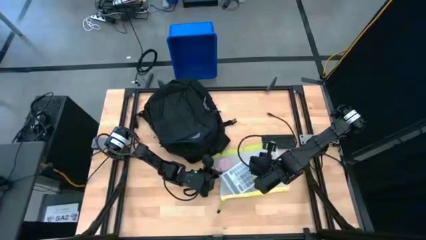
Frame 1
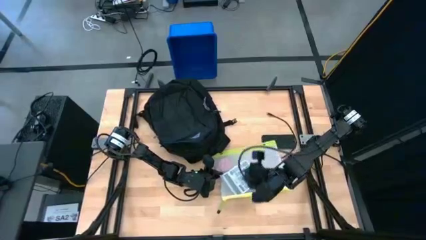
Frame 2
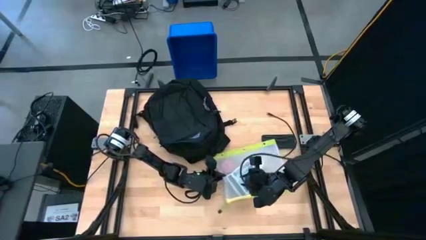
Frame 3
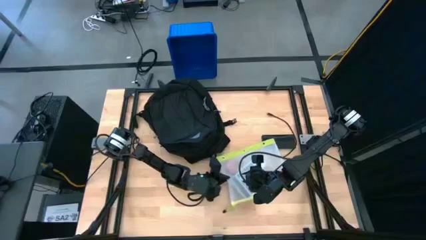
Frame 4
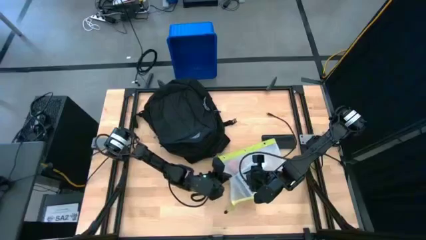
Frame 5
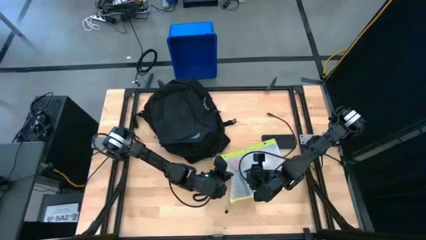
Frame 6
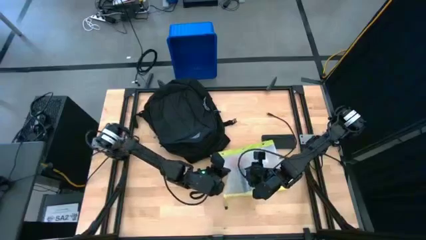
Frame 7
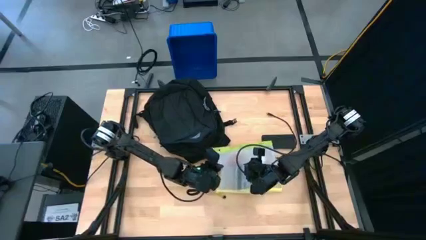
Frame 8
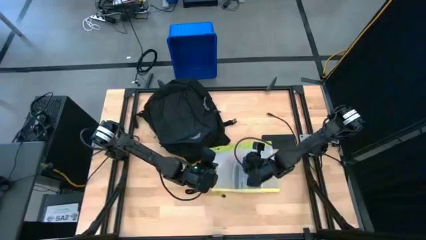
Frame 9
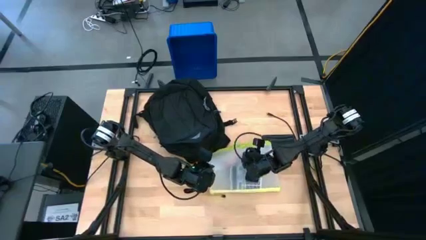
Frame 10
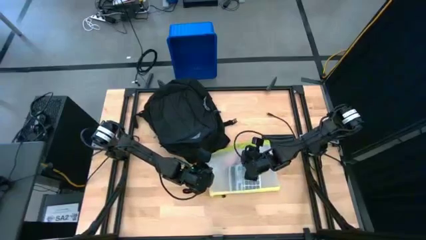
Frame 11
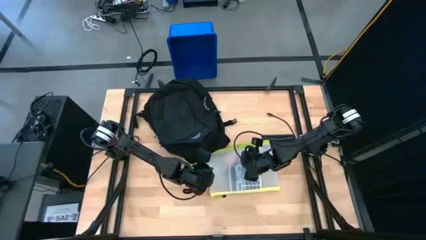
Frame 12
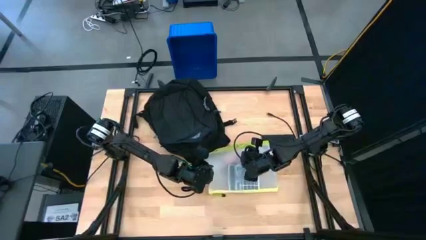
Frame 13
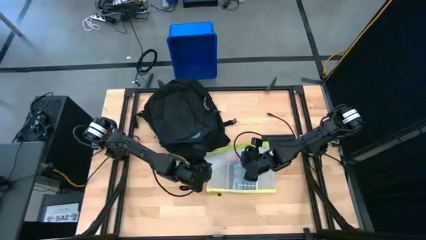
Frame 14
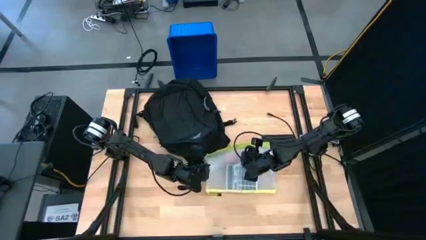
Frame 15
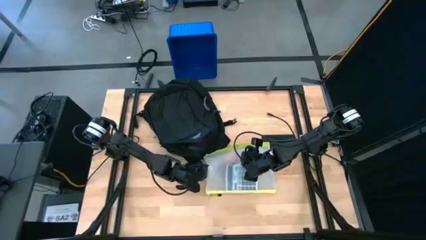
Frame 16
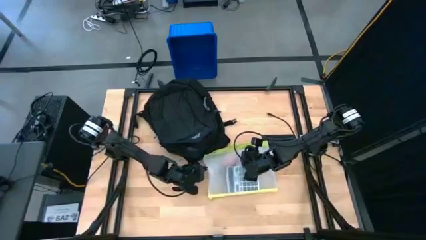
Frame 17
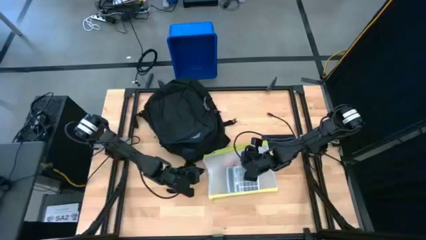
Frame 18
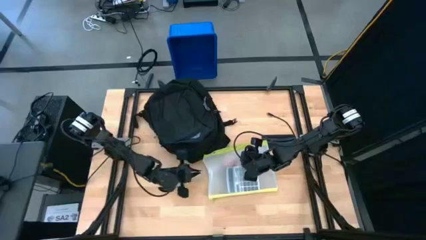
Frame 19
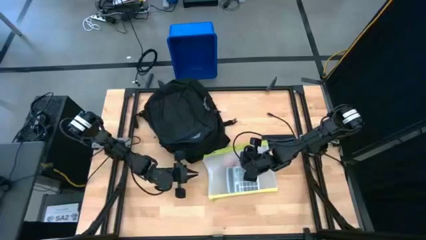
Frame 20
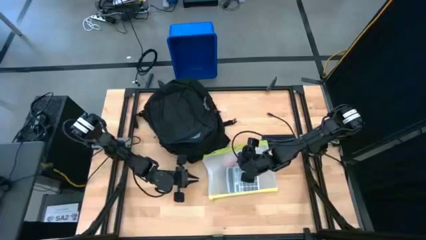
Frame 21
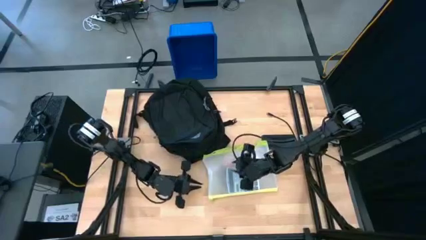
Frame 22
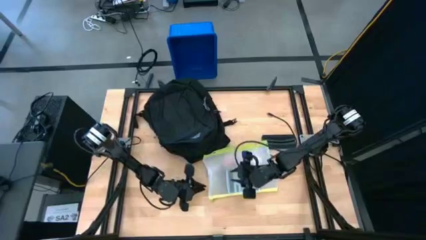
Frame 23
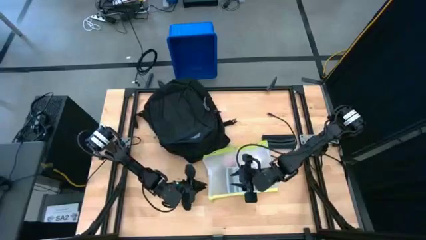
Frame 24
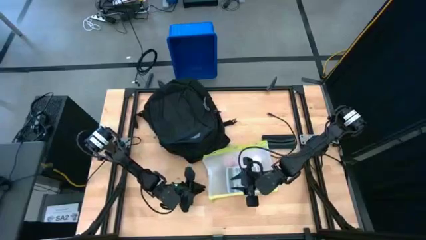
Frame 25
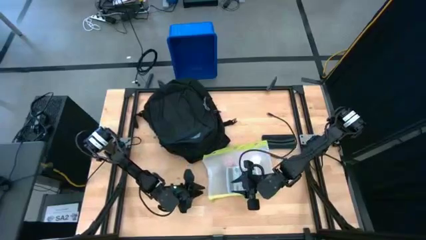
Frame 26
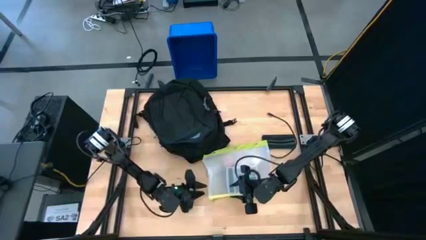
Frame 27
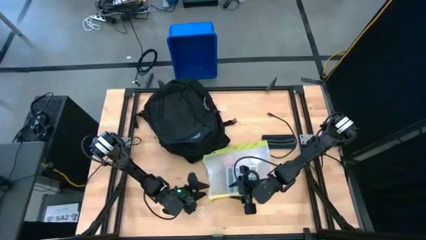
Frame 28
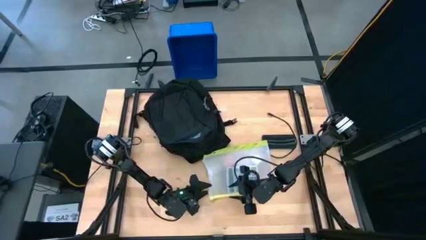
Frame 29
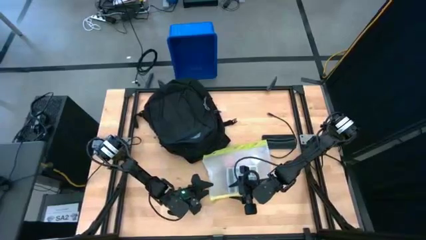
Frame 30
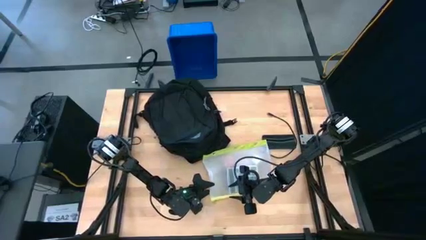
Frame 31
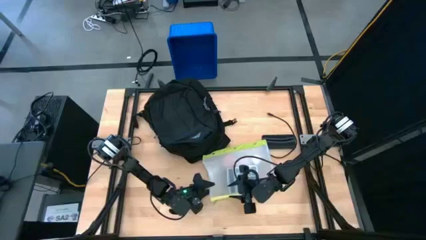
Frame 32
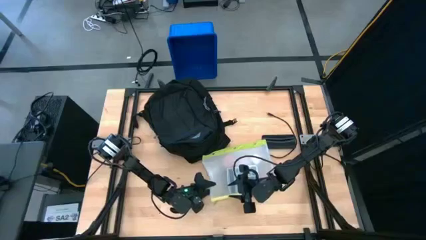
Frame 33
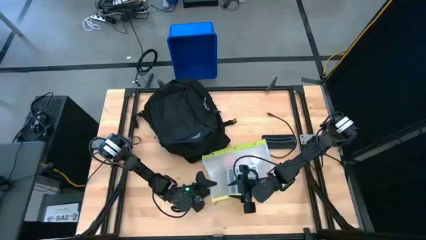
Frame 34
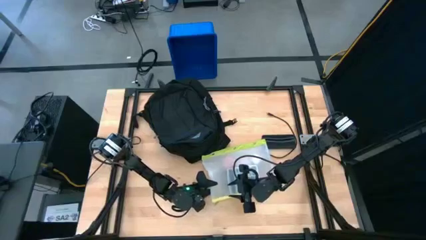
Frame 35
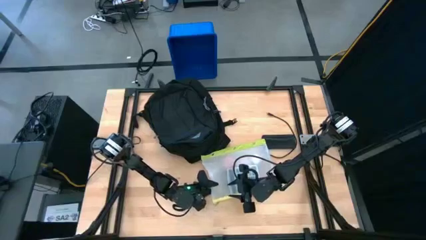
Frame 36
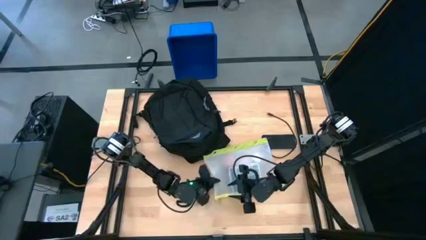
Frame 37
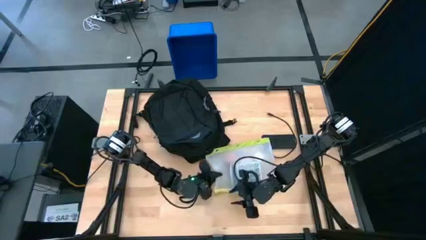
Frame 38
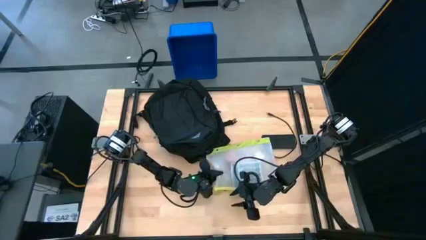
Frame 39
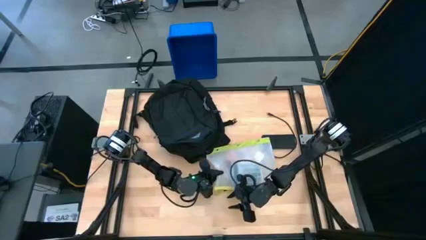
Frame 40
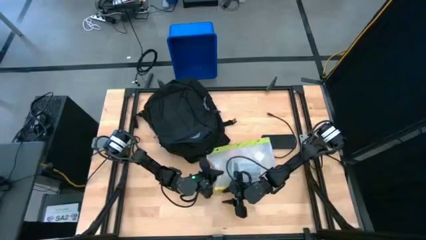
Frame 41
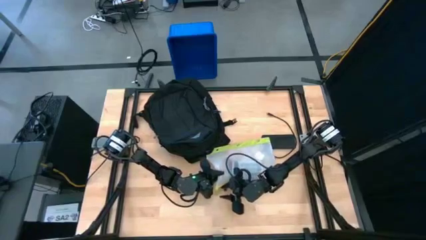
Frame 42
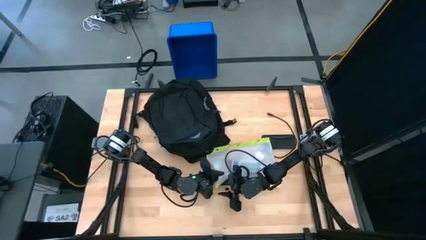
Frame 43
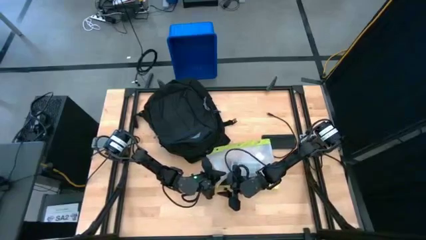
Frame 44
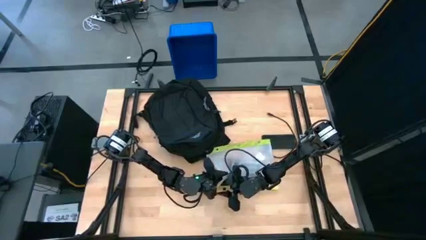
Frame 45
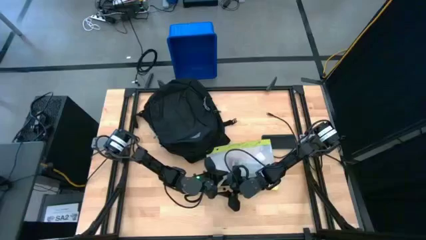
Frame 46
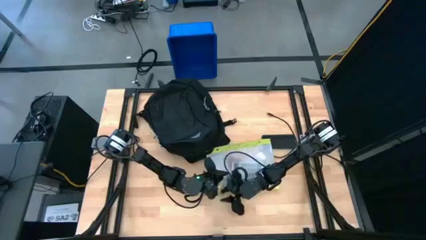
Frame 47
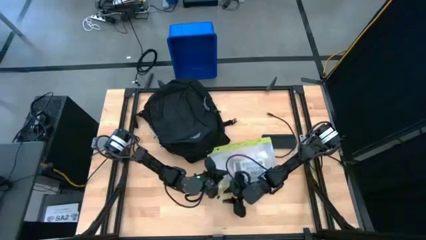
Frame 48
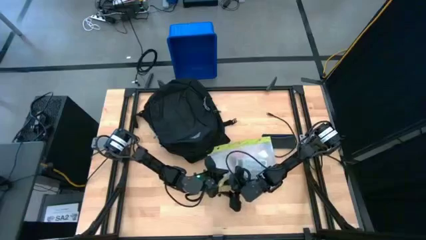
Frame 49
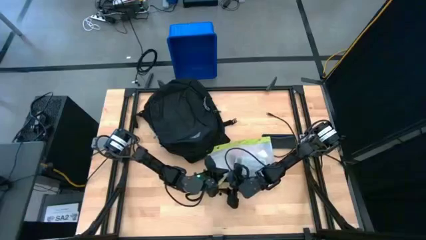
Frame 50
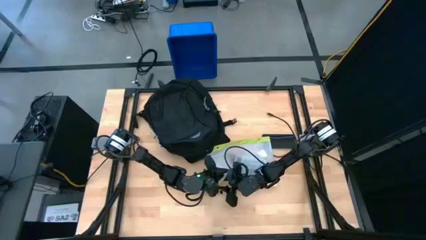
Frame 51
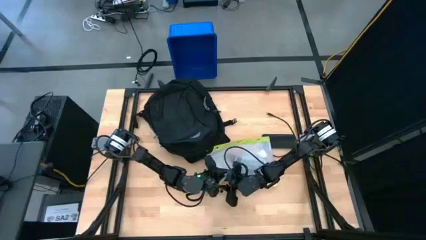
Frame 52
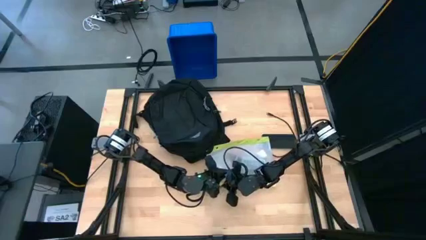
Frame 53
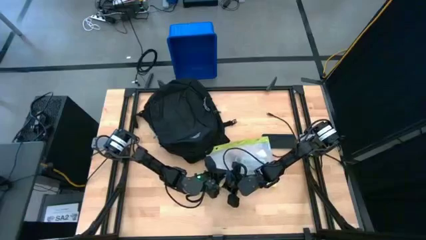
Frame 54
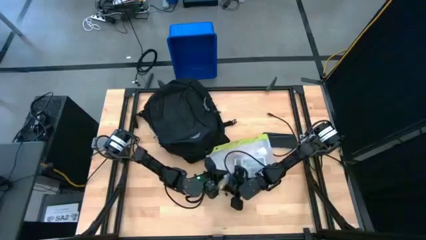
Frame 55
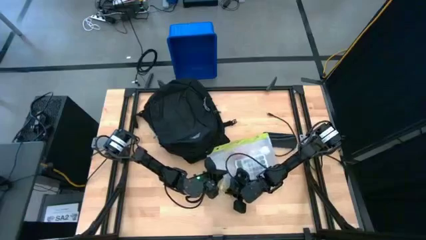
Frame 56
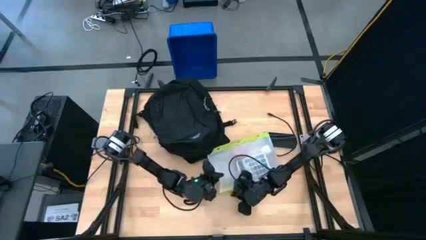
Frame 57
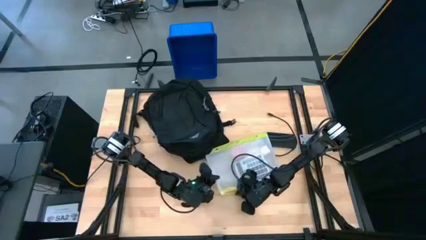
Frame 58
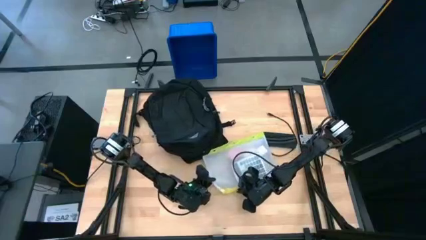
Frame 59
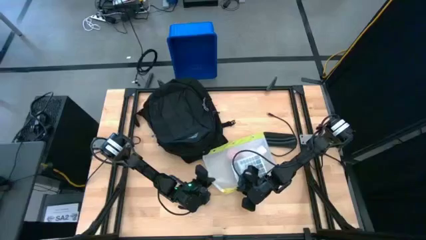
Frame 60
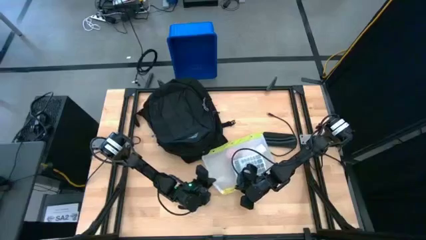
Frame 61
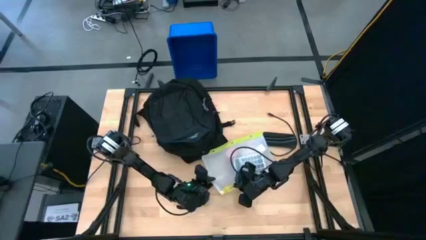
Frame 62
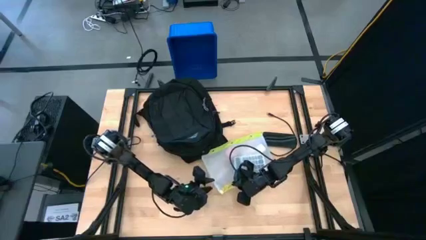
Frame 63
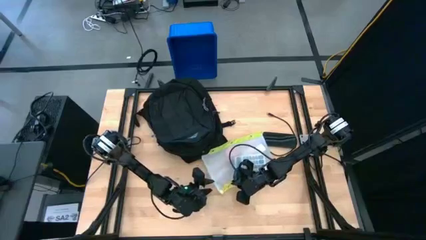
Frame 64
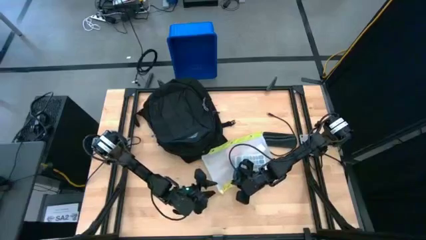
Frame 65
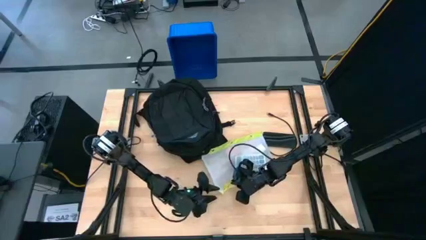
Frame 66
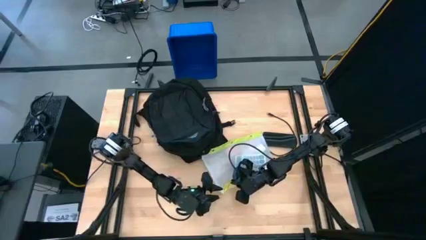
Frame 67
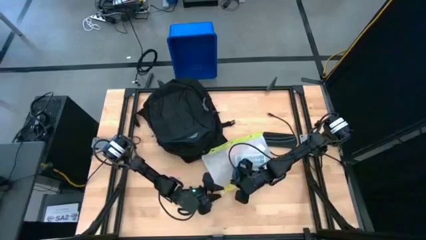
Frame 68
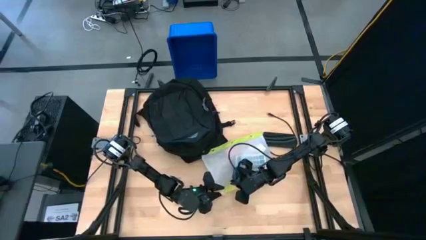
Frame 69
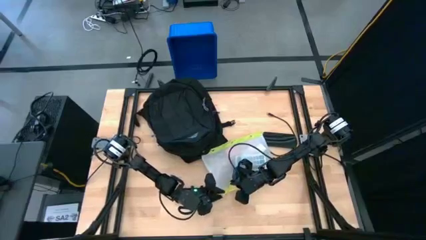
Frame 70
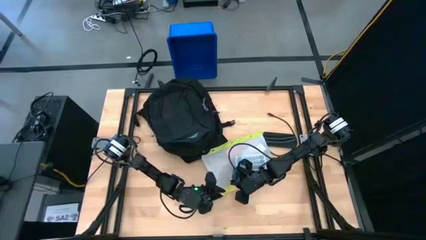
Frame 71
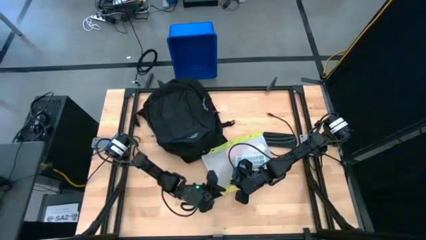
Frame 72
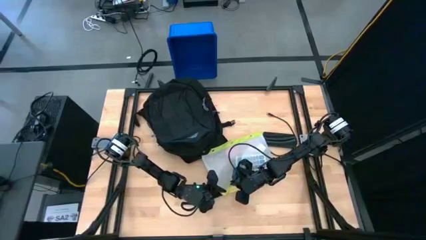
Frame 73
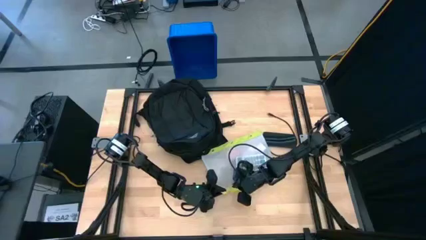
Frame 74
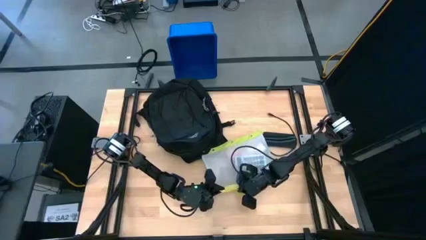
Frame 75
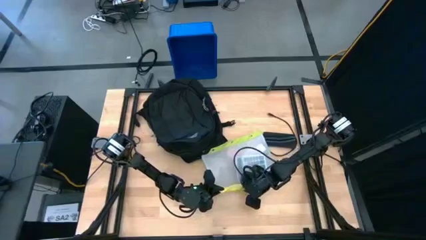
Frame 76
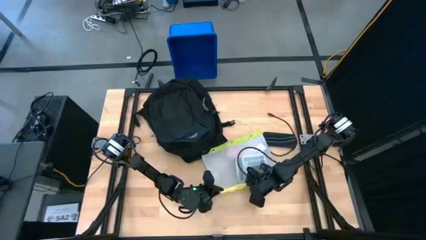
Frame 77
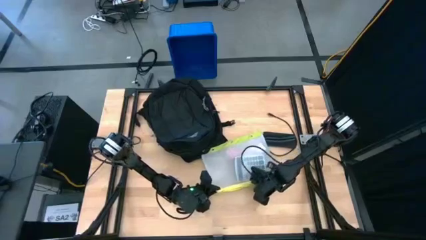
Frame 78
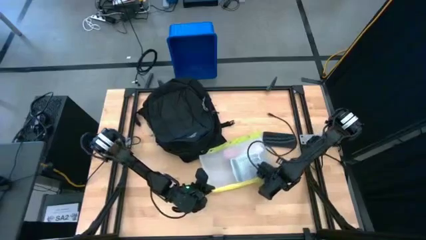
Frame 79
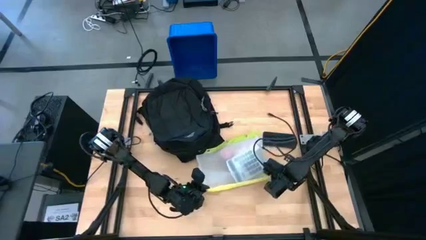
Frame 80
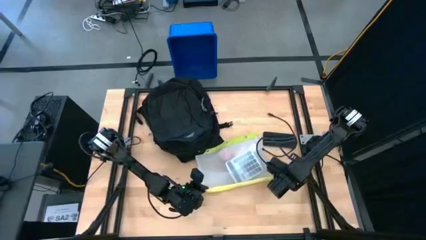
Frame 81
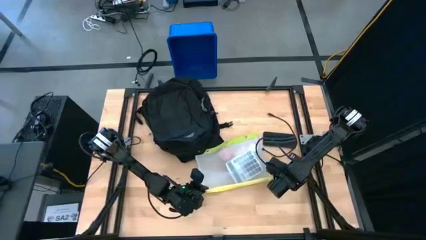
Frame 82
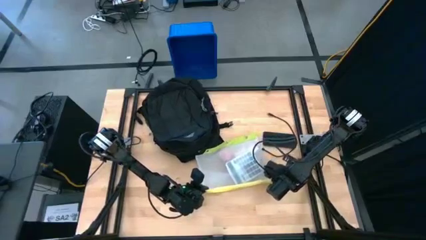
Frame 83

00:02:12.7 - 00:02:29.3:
Task: Unpack backpack
Open the zip lock bag
